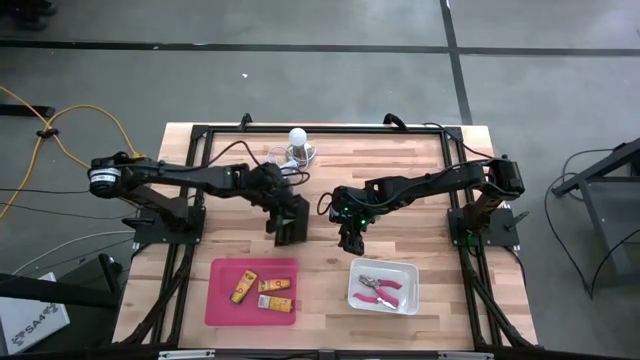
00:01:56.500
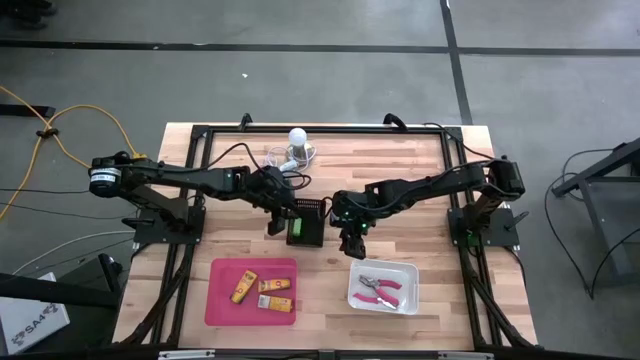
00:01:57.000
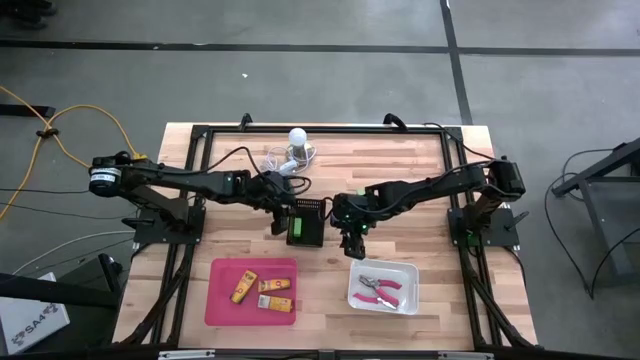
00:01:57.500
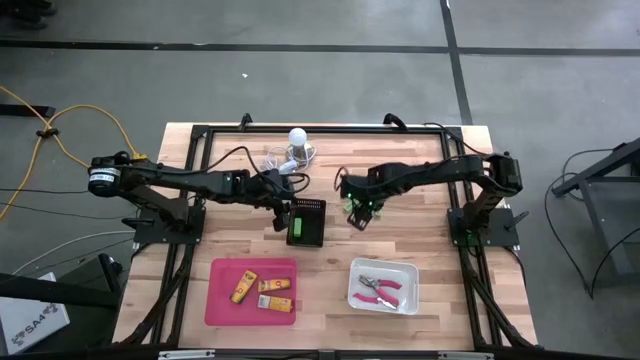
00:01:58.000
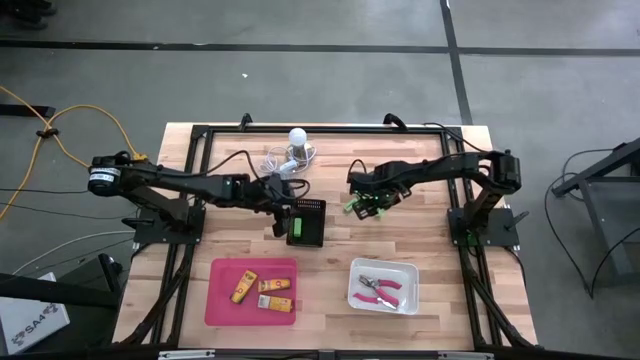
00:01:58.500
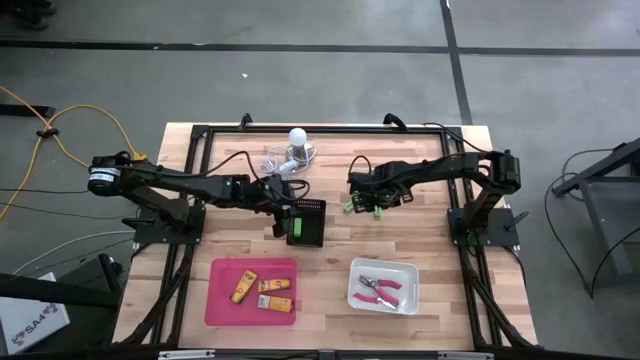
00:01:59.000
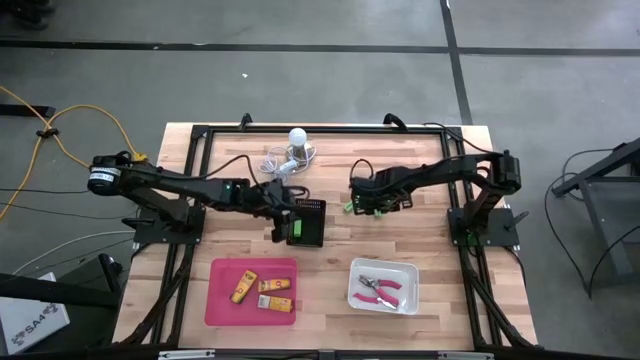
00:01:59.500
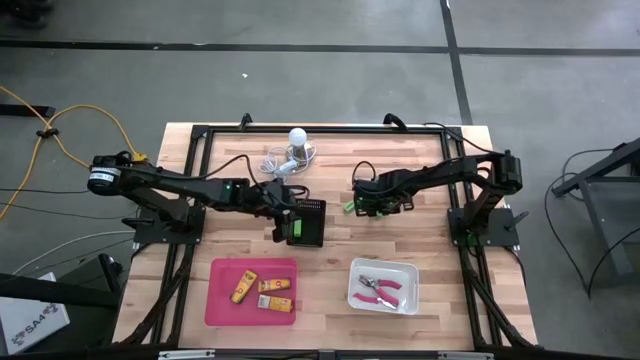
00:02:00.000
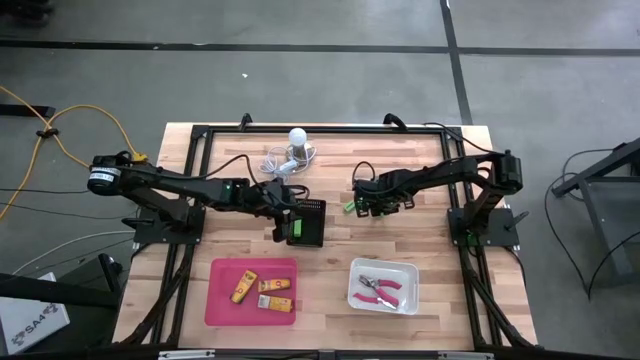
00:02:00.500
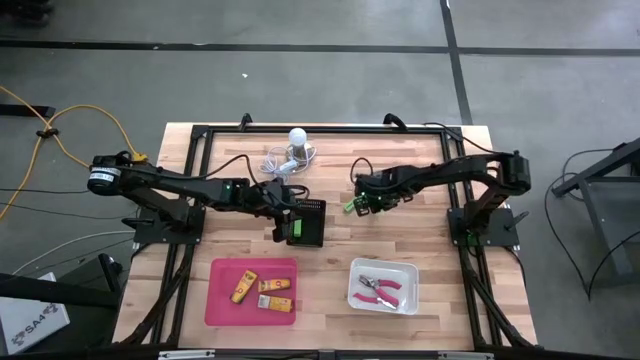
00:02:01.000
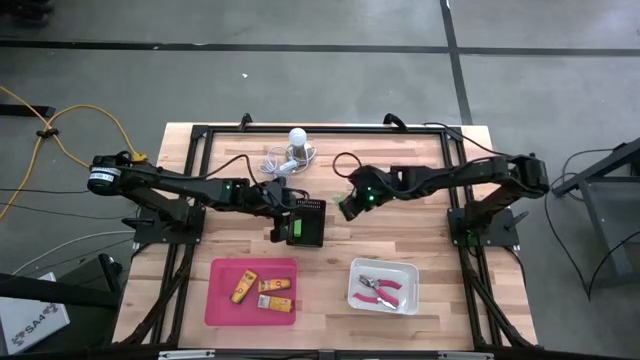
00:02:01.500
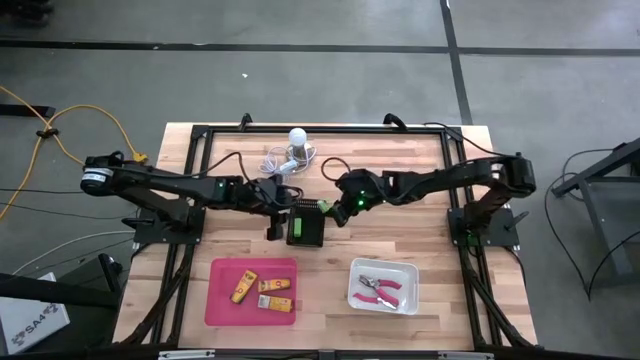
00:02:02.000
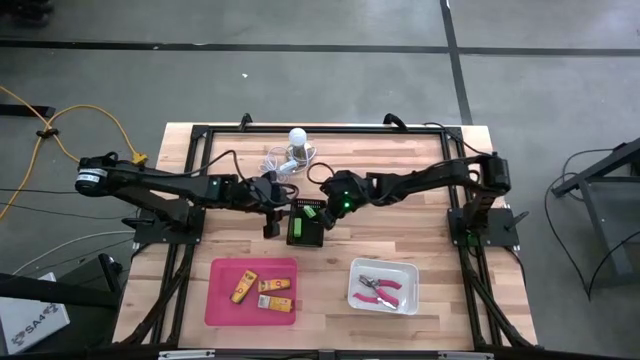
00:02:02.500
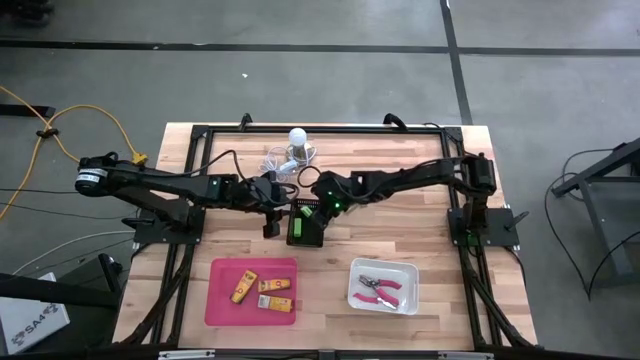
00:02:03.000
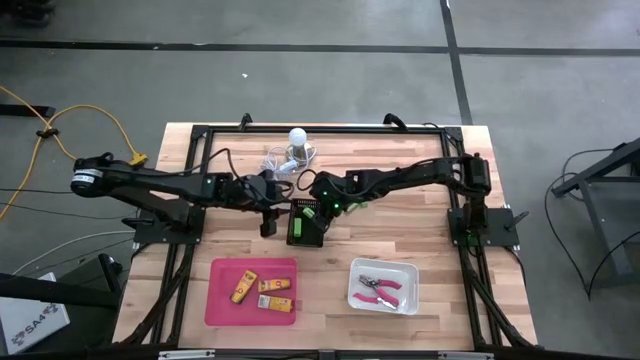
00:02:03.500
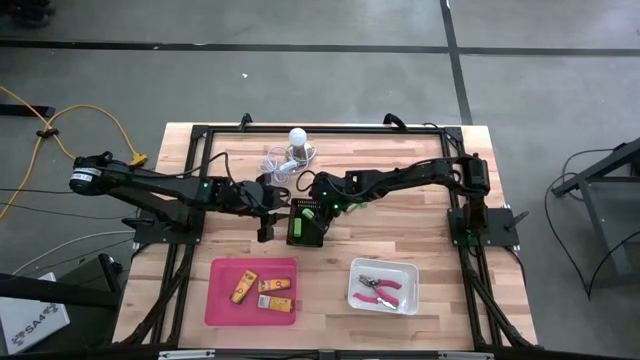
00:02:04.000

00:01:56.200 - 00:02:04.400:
Task: Pick & Place School Supplies
Put the green eraser into the black bin

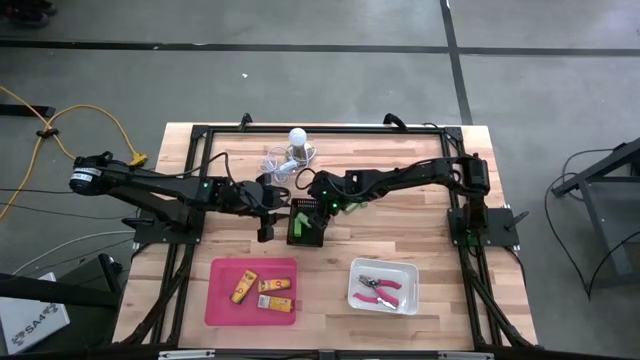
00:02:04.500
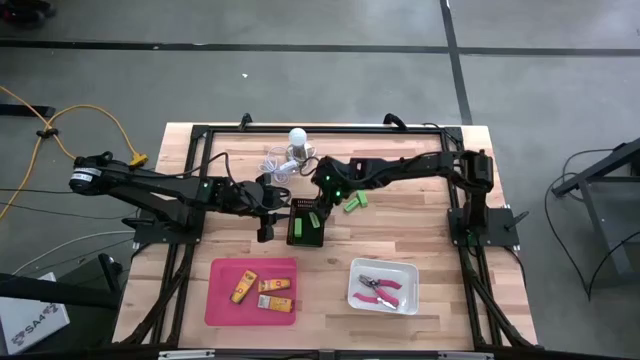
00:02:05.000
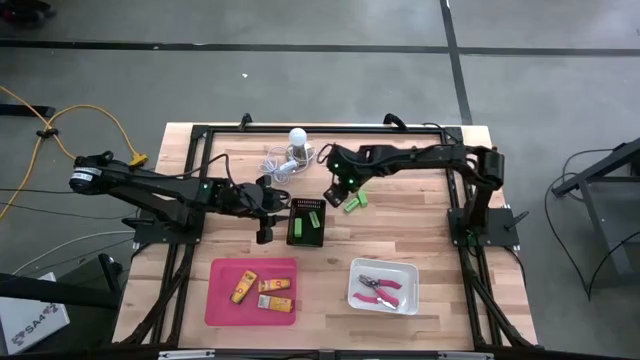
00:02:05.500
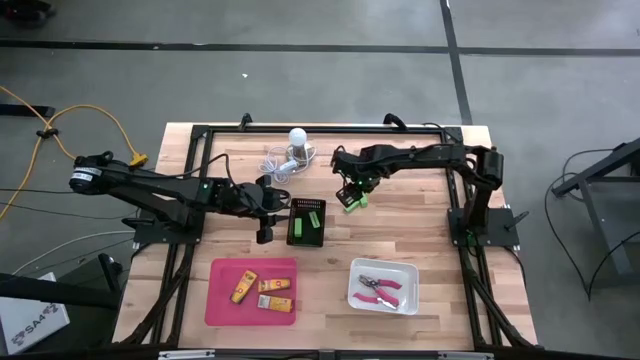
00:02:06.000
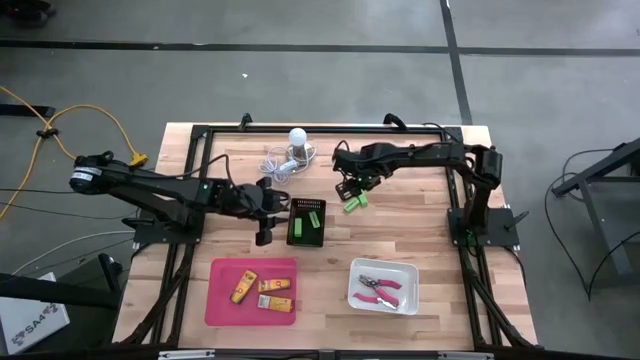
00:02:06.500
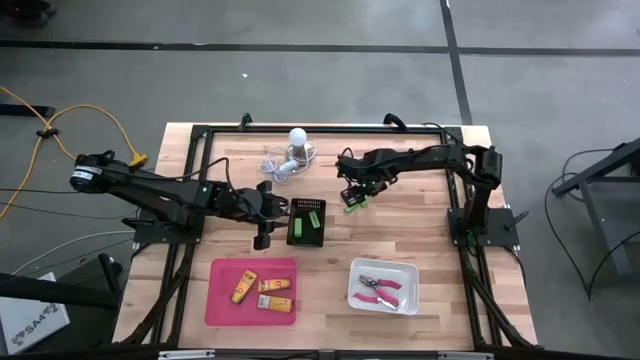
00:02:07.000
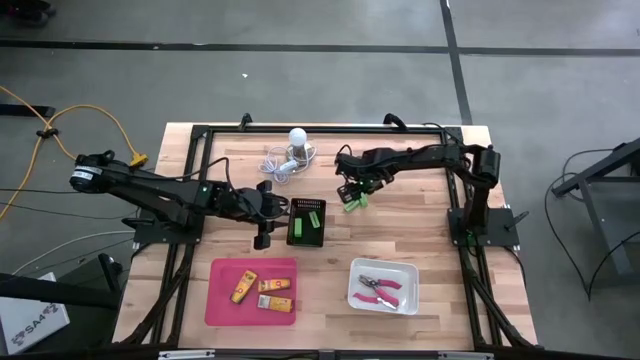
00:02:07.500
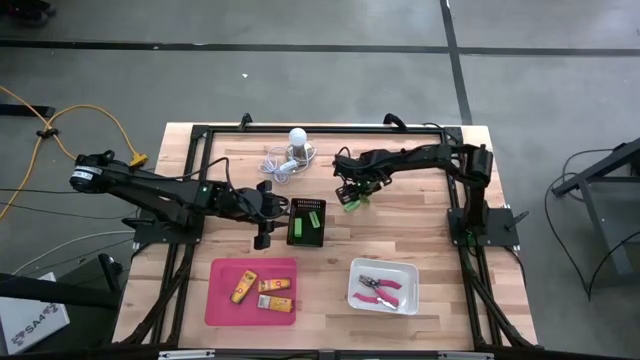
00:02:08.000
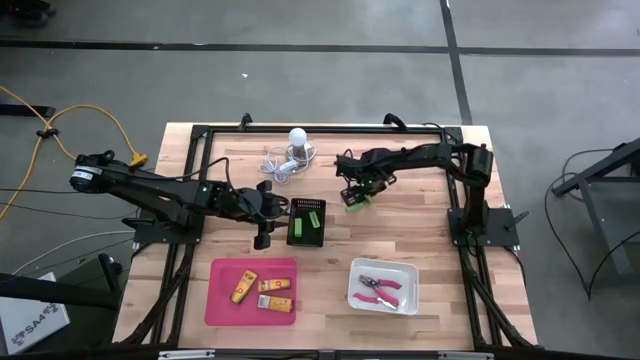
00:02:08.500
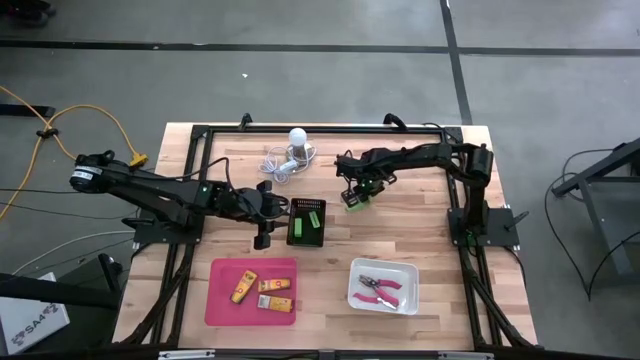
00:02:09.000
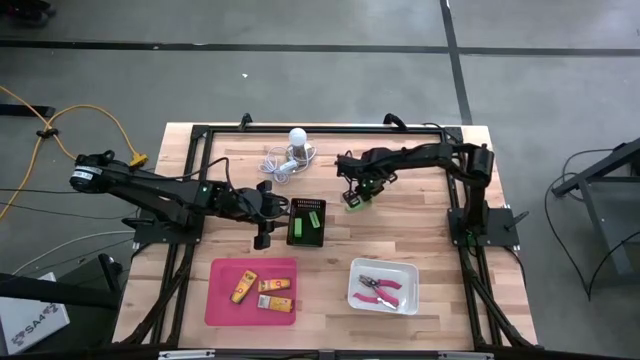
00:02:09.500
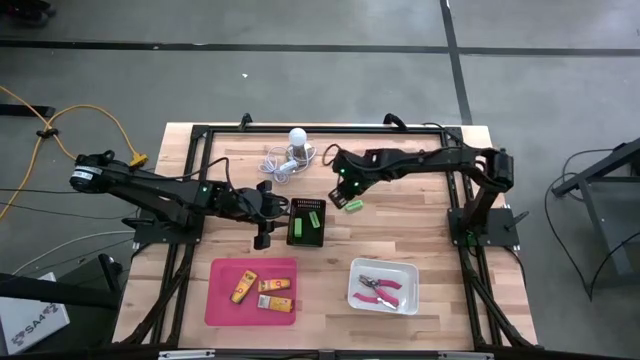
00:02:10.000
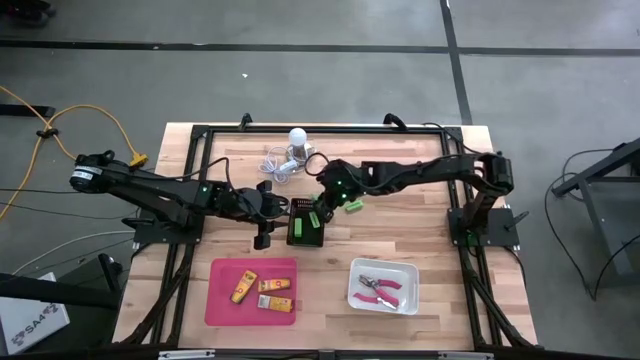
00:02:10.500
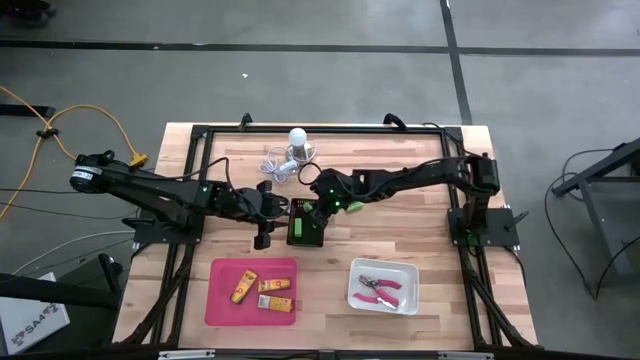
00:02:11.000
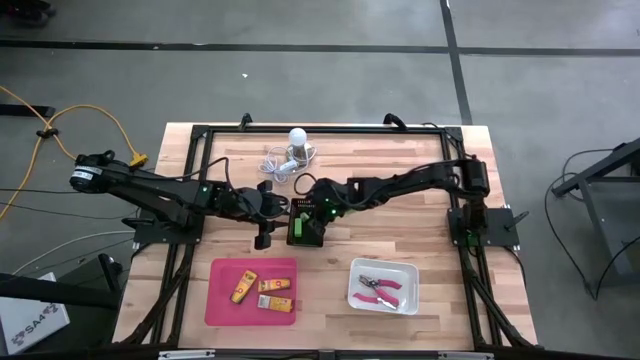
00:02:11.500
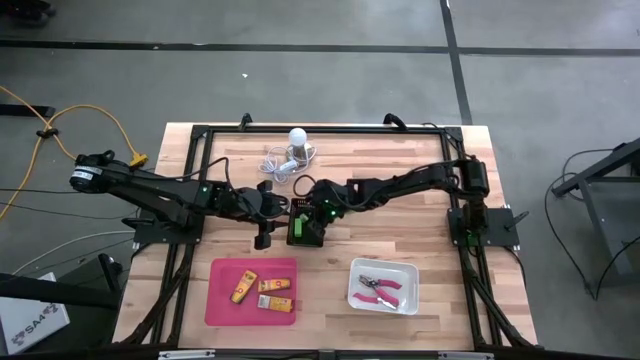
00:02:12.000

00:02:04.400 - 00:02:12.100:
Put the green eraser into the black bin

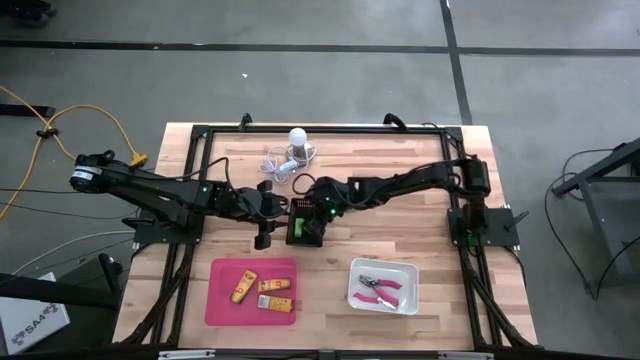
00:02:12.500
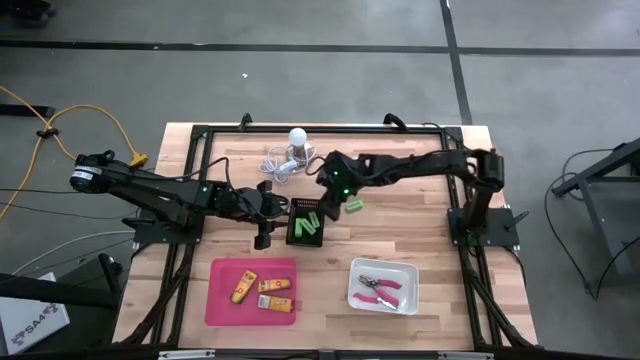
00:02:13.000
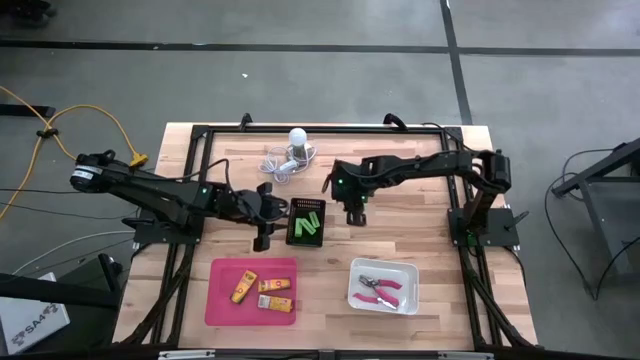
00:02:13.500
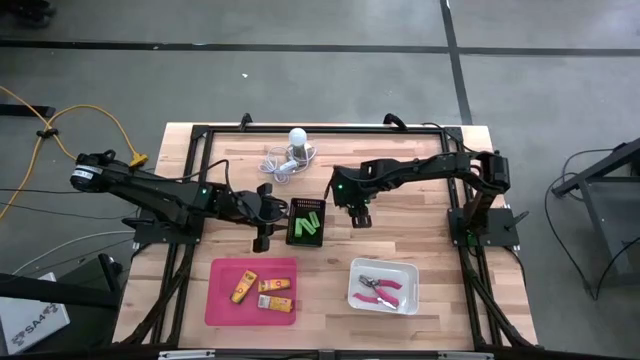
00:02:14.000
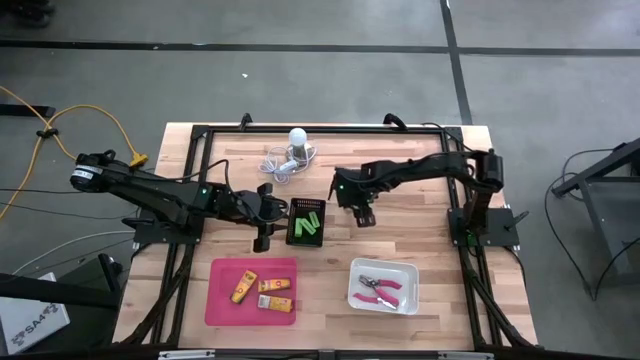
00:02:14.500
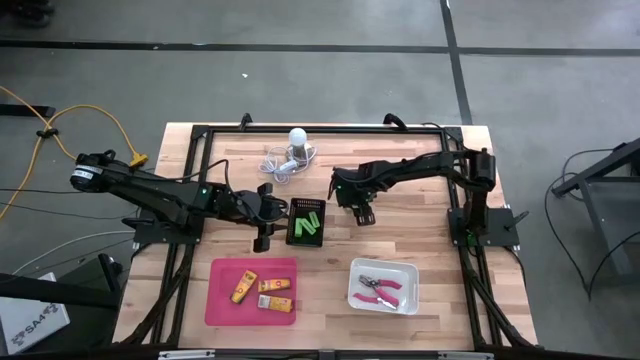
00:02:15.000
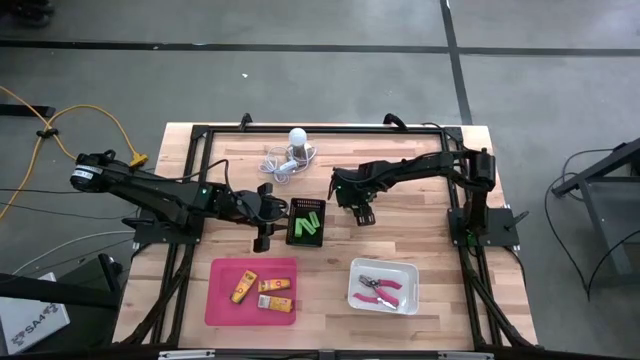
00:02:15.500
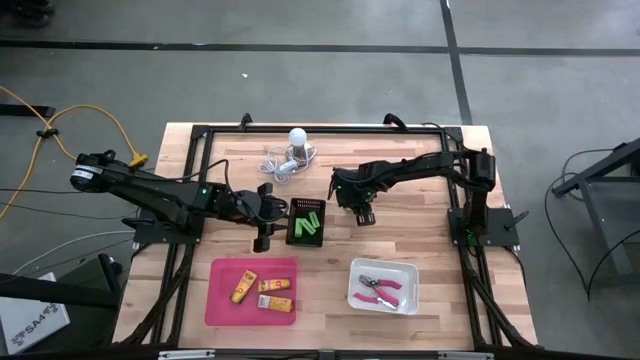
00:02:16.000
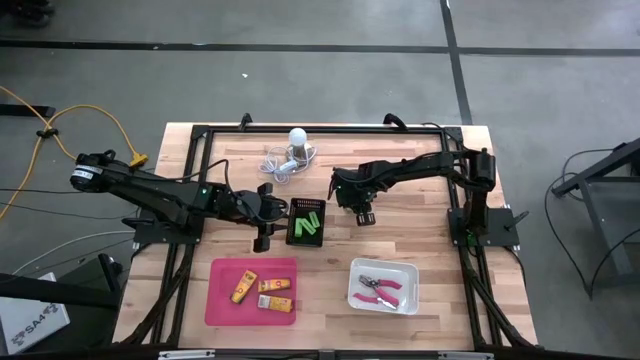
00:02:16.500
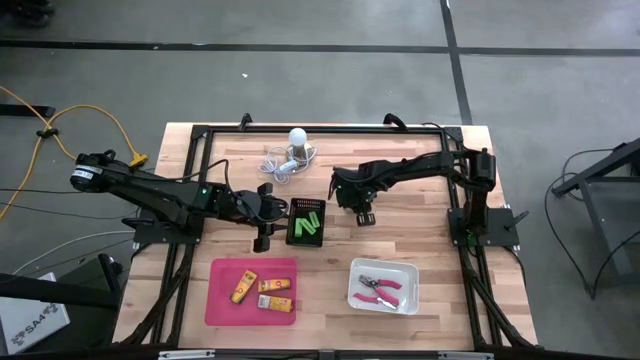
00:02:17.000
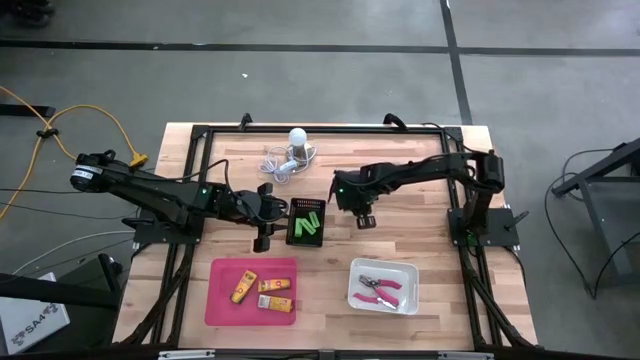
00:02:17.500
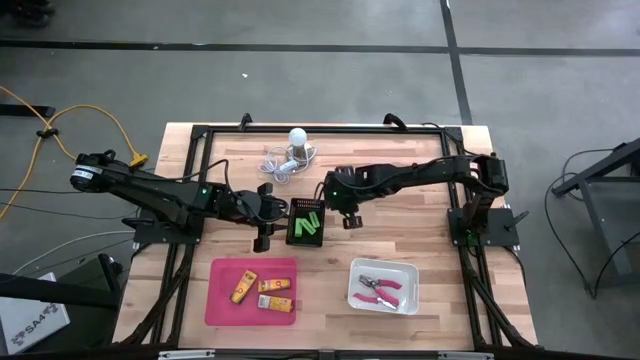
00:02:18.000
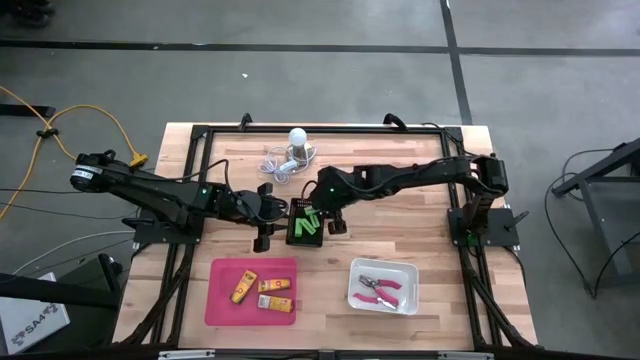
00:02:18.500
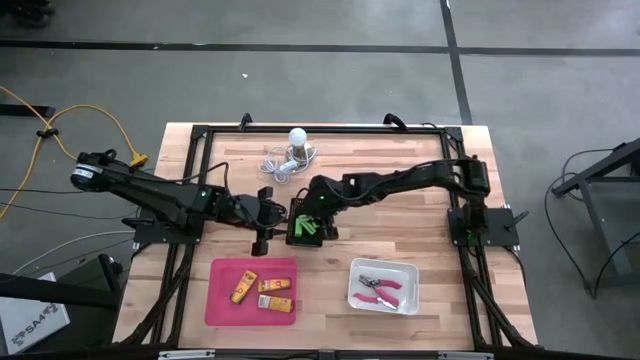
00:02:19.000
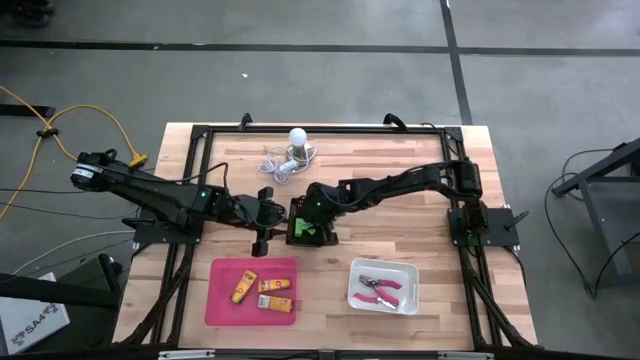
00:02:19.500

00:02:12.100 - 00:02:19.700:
Put the green eraser into the black bin
